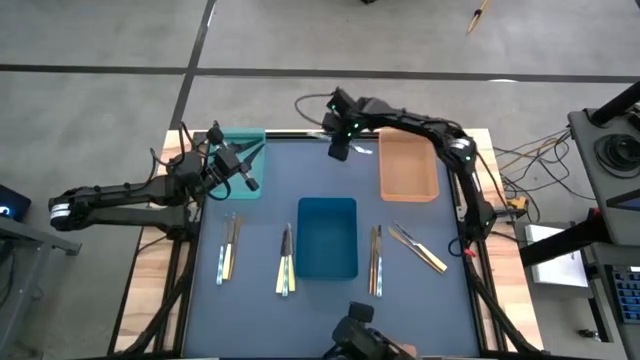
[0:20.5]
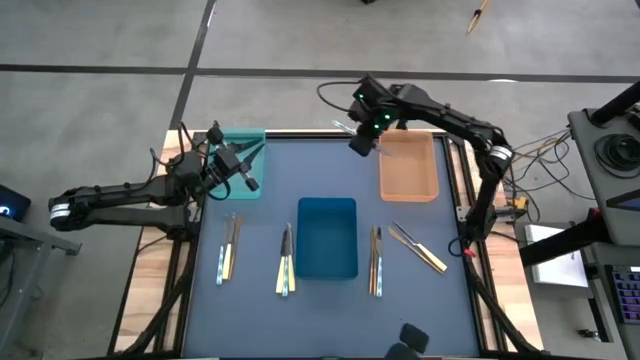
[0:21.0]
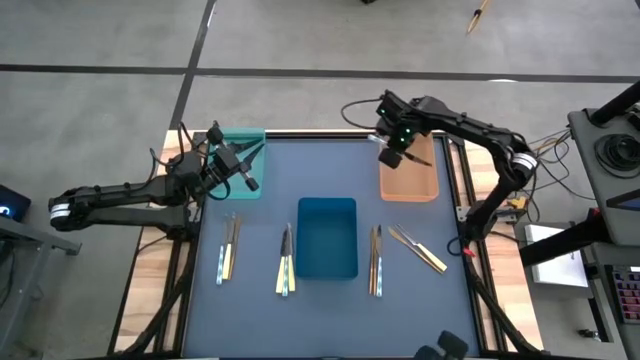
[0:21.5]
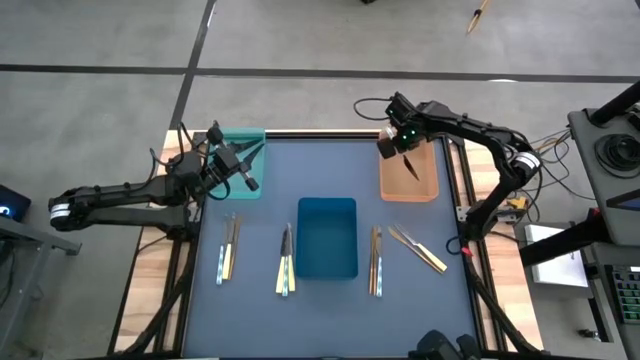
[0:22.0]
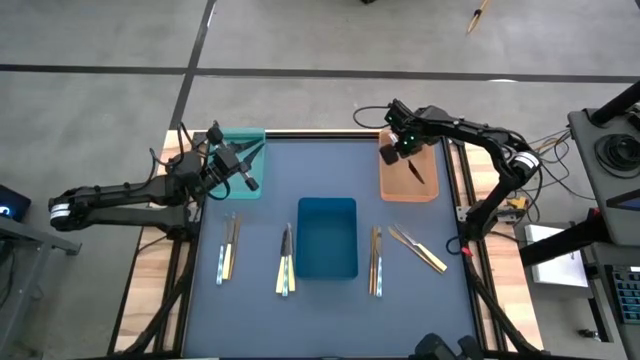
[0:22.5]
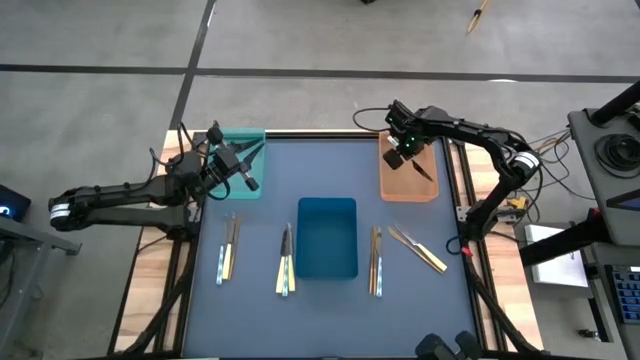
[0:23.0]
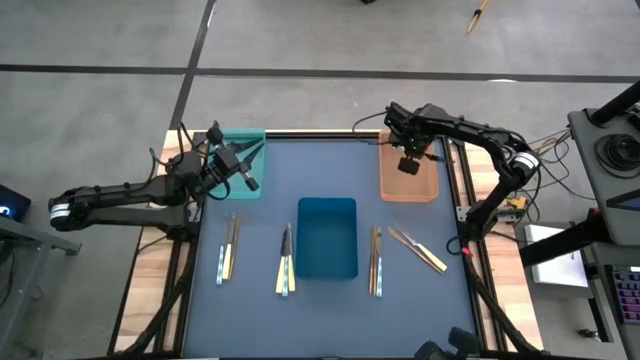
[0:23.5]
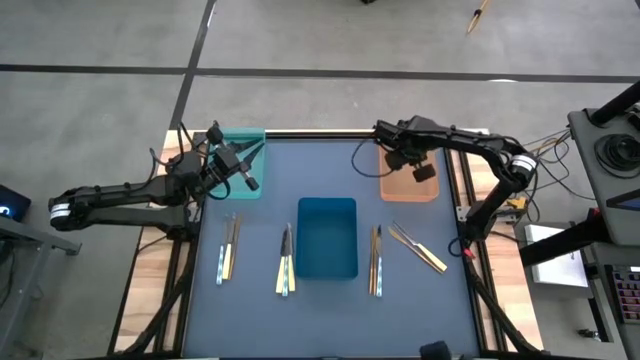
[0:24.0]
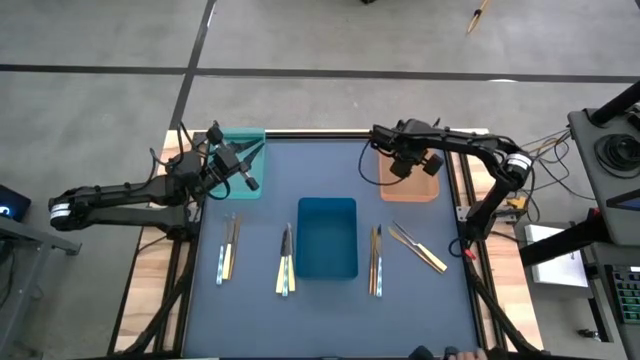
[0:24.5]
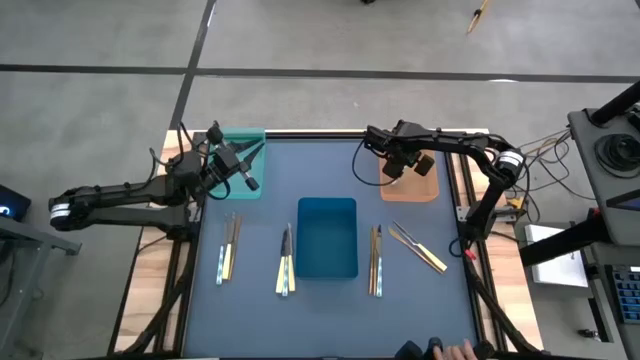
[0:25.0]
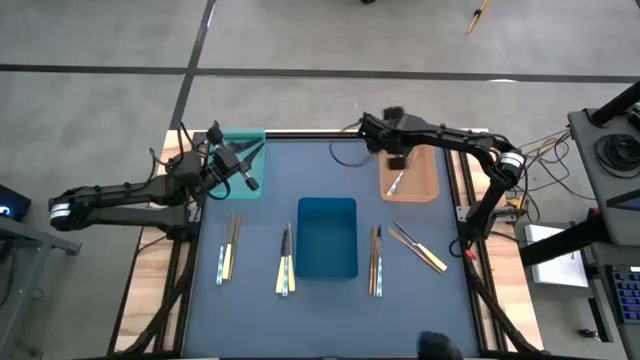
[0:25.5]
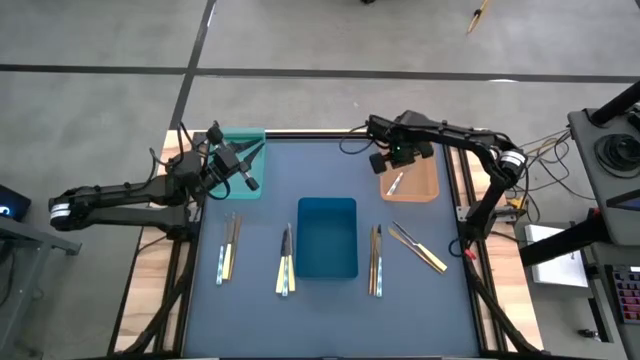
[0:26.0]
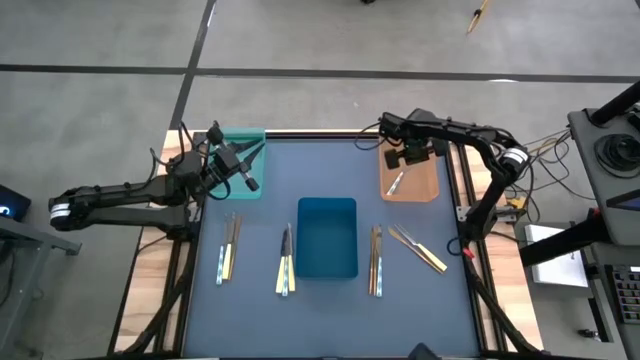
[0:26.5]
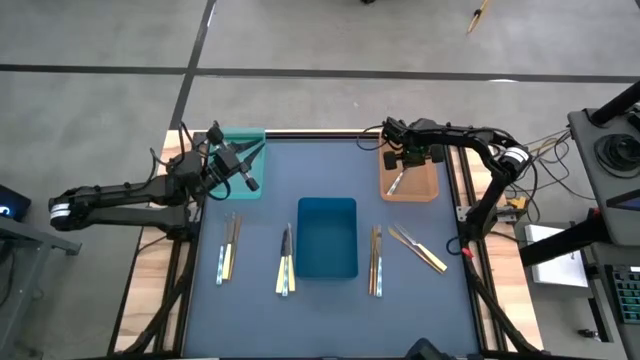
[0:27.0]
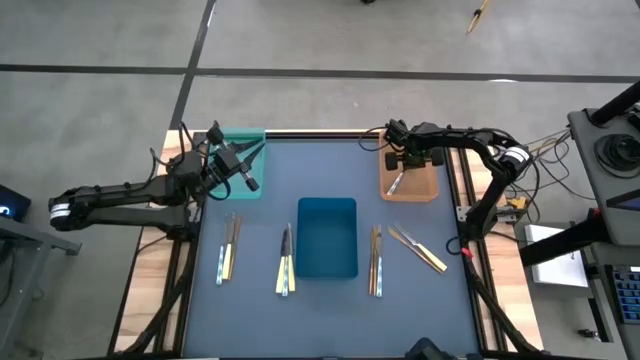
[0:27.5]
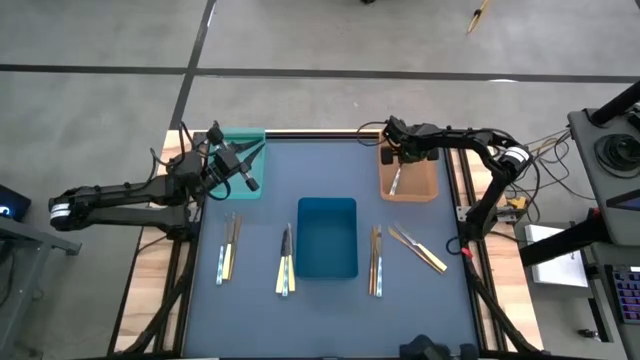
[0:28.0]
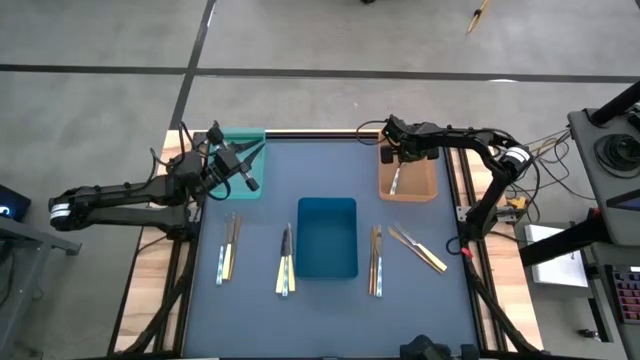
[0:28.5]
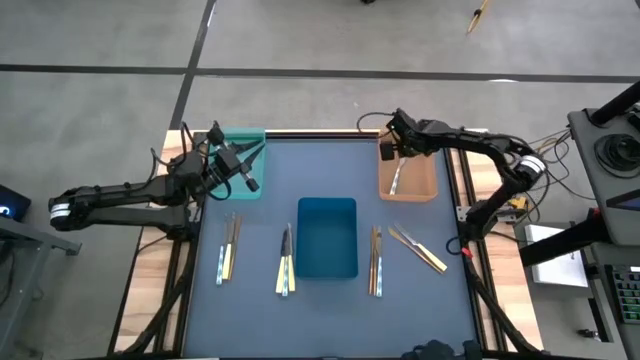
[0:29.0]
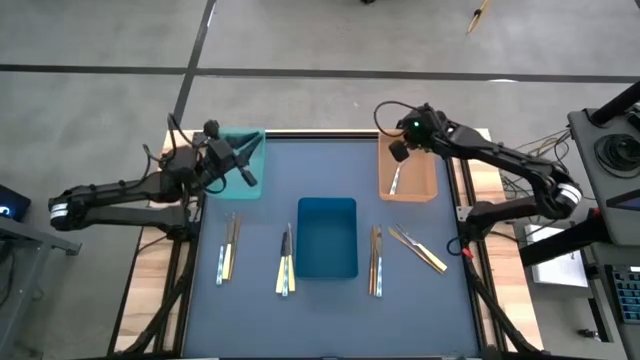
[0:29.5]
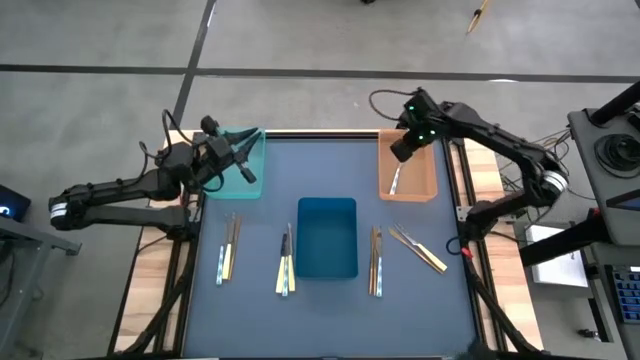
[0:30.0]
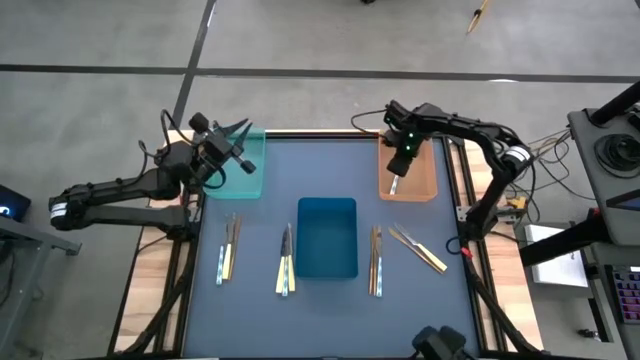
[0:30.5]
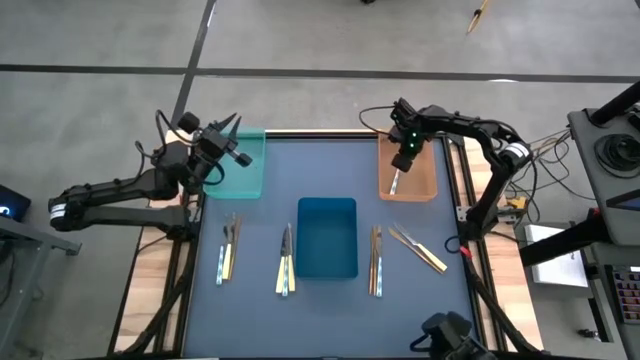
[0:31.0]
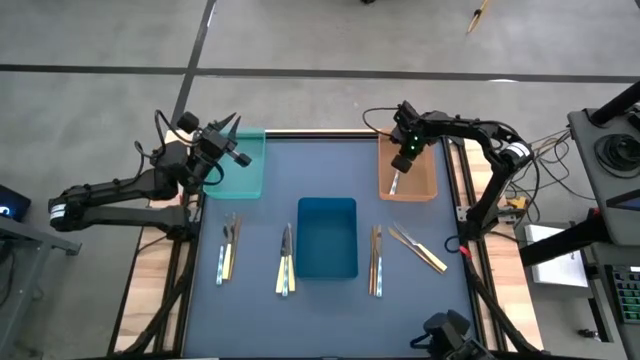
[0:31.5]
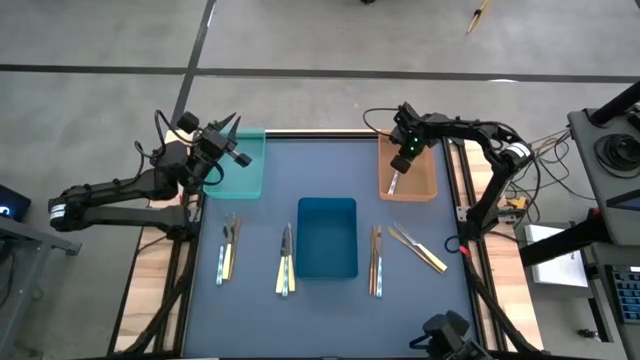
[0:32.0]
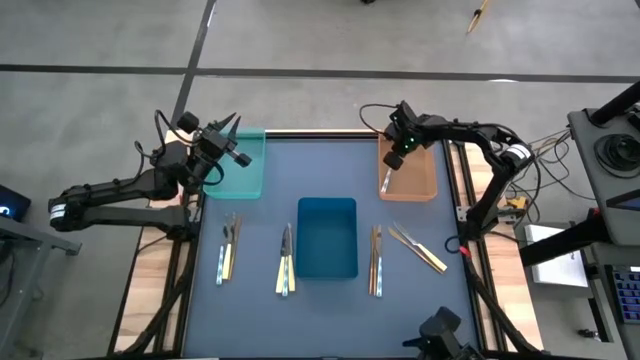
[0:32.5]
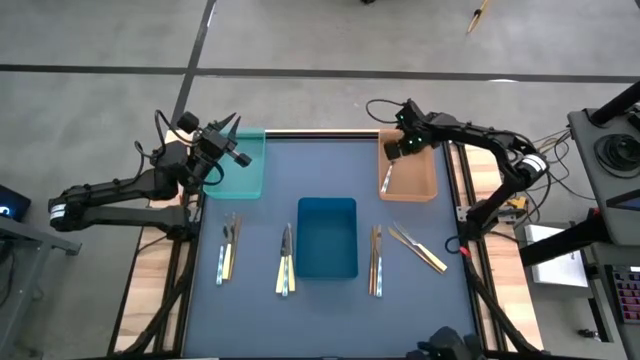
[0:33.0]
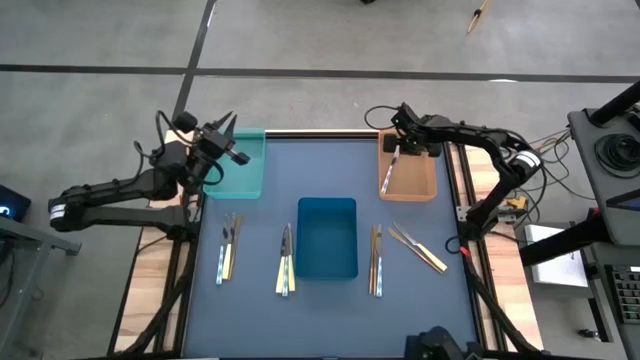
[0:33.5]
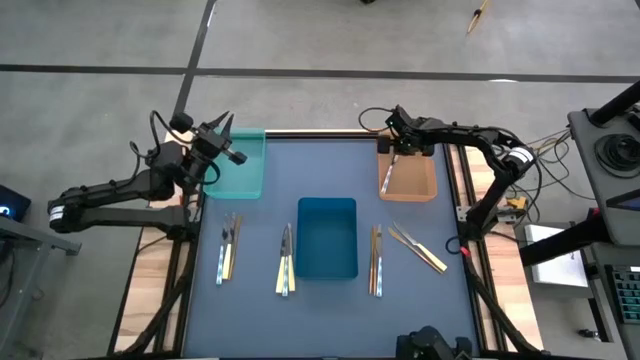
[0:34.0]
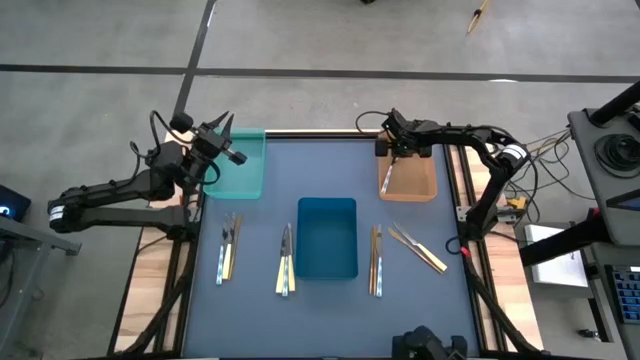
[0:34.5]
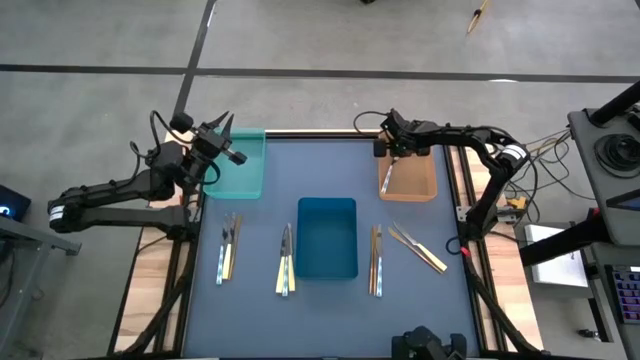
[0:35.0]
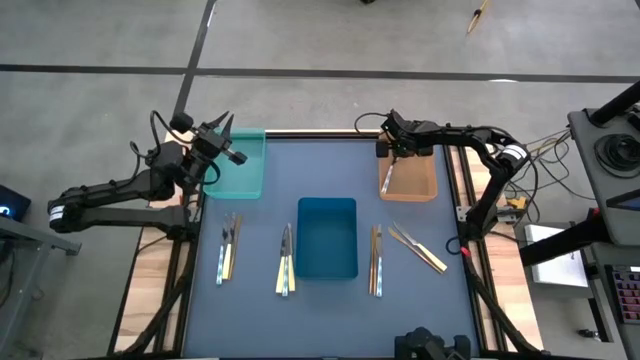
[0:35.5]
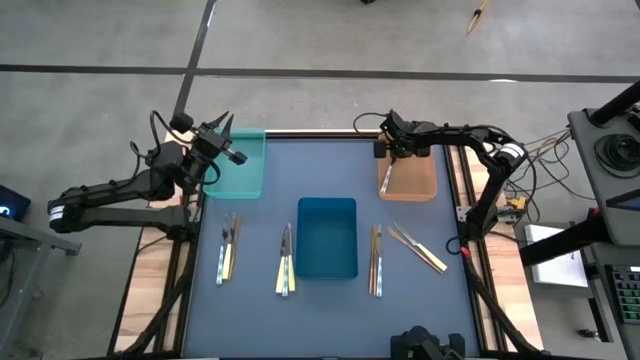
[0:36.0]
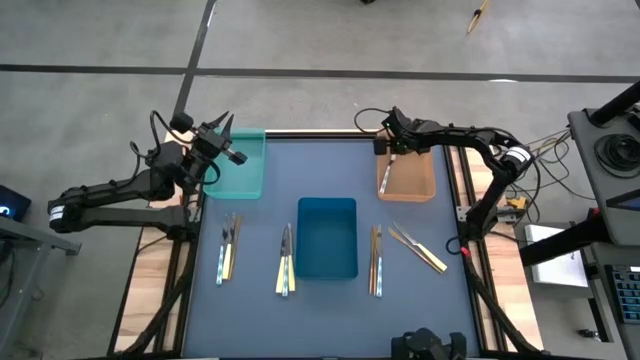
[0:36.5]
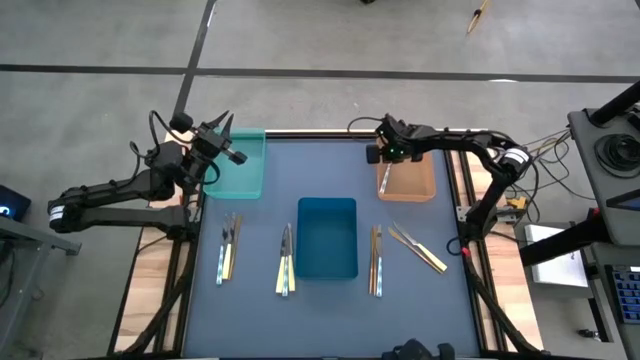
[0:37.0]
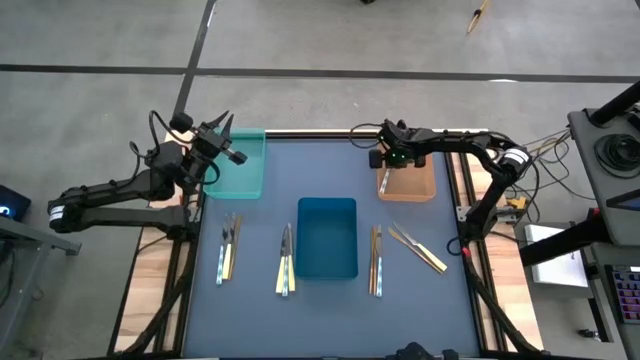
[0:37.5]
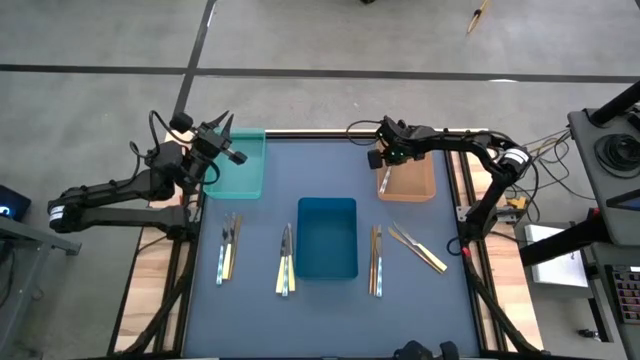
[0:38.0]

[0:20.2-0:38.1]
Task: Sort silverware by color (type)
Put the top right blue and white knife into the orange bin

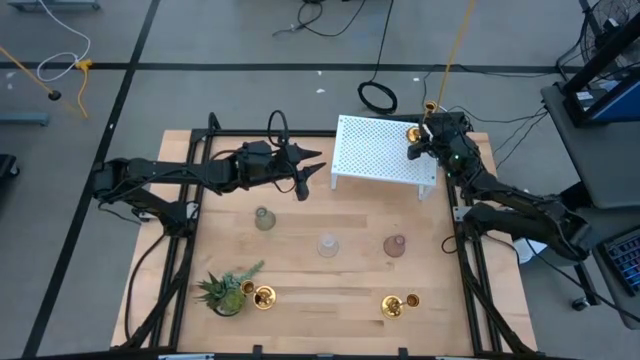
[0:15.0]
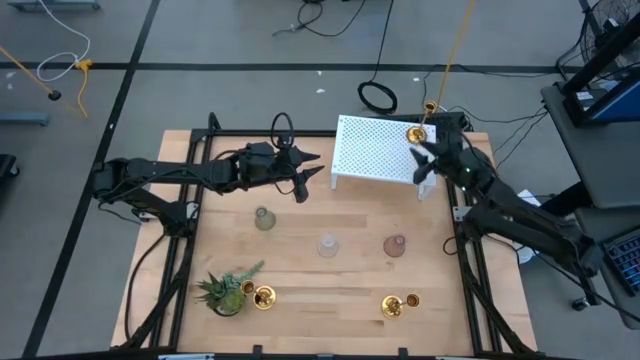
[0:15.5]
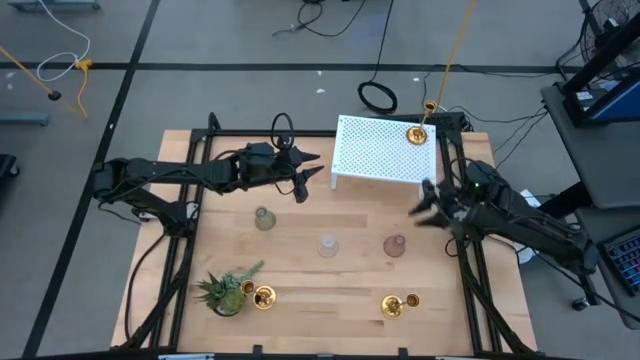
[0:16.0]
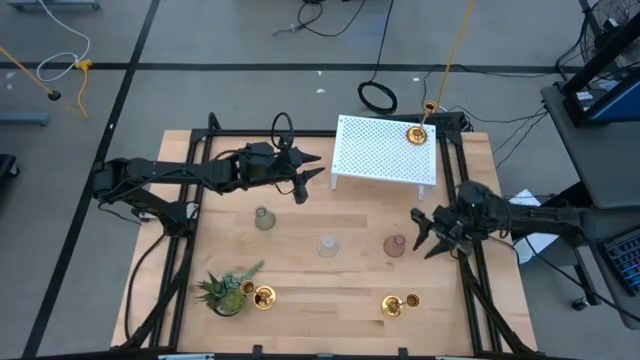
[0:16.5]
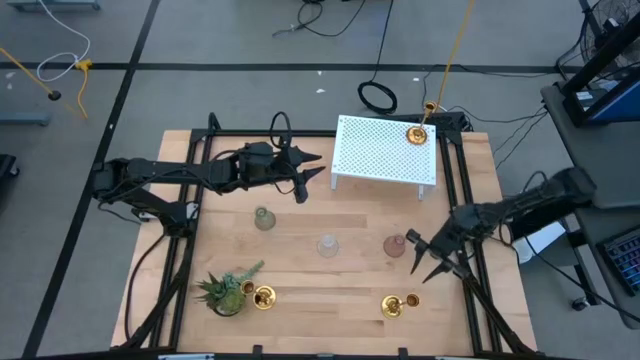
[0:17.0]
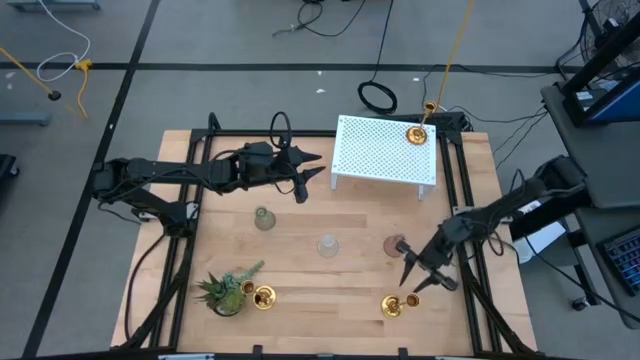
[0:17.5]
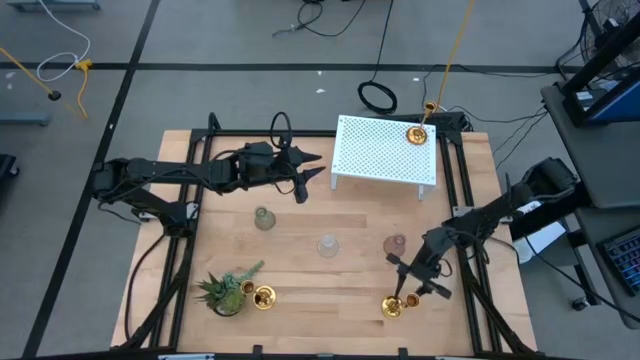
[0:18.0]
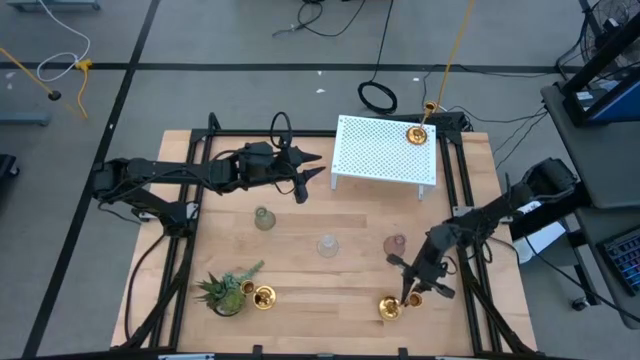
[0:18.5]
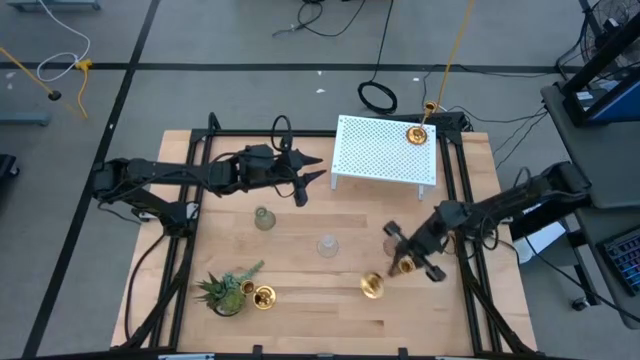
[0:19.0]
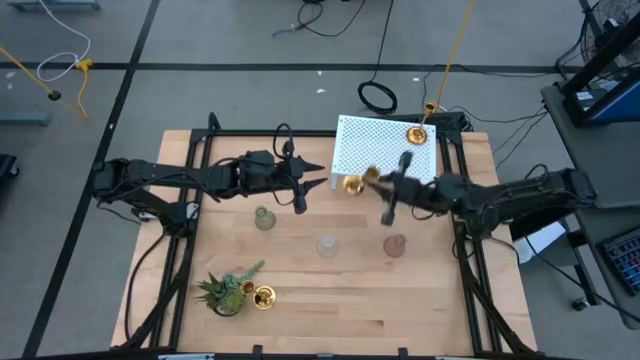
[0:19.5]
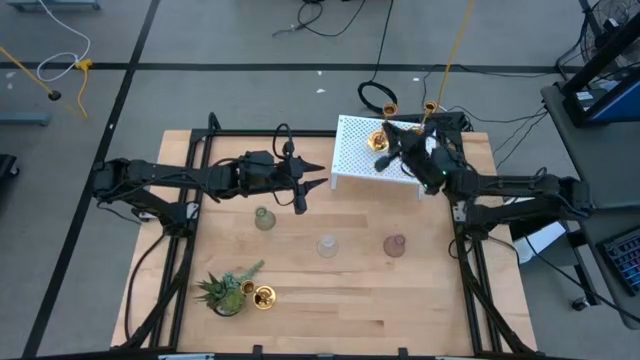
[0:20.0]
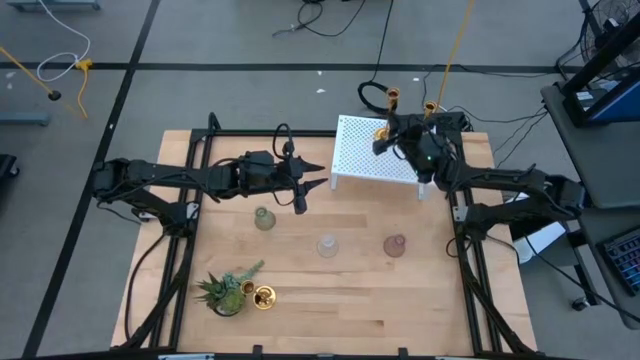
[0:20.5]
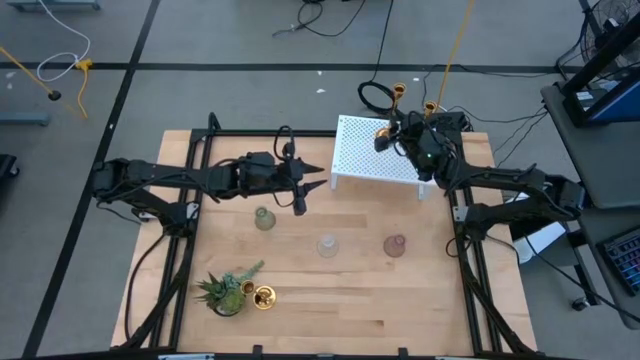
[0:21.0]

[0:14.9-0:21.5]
Task: Pick & Place candle stick holders
Put the right gold candle holder on the shelf
